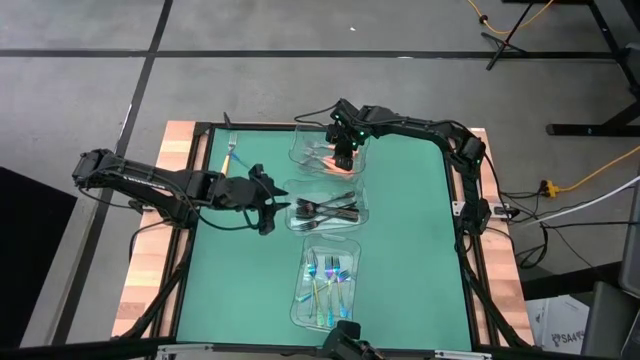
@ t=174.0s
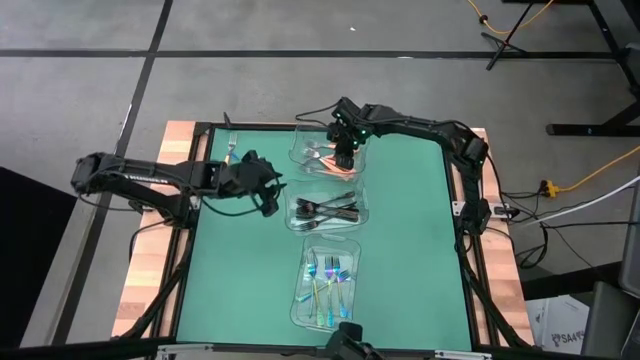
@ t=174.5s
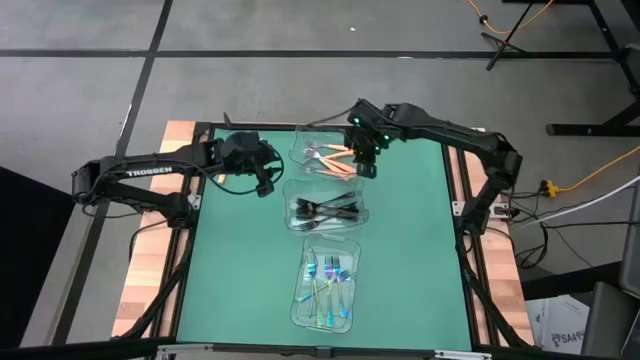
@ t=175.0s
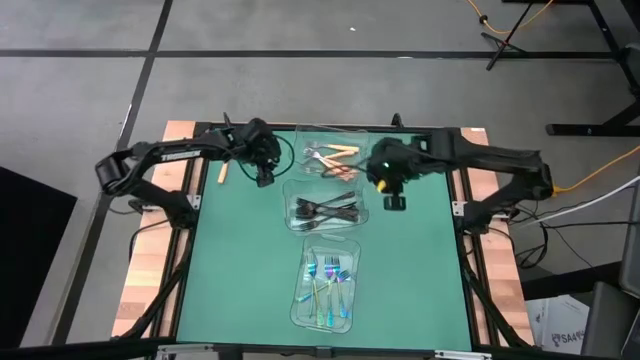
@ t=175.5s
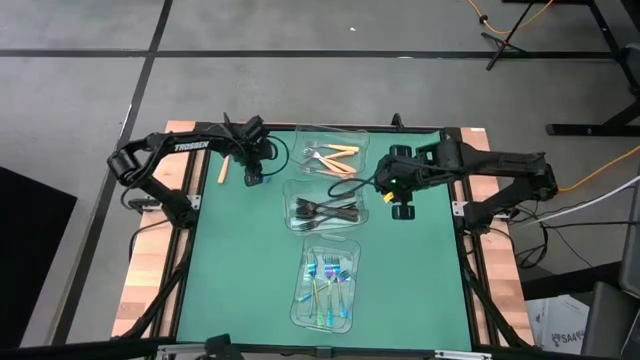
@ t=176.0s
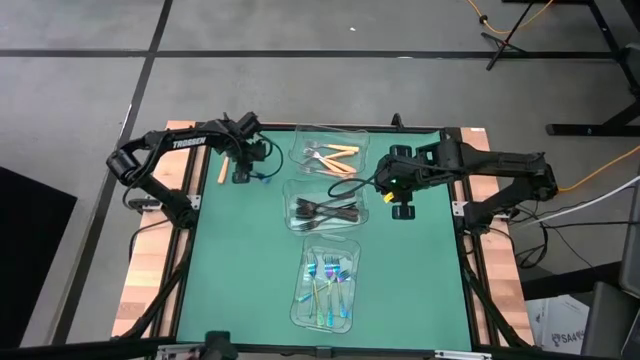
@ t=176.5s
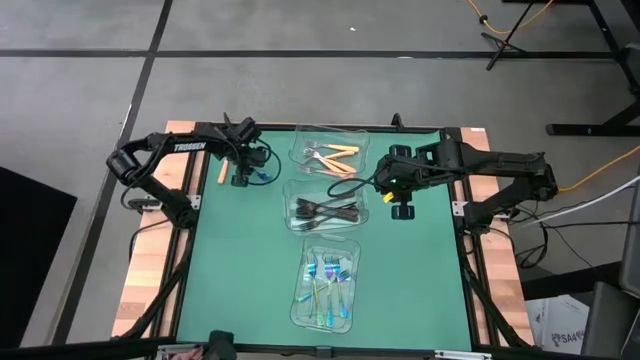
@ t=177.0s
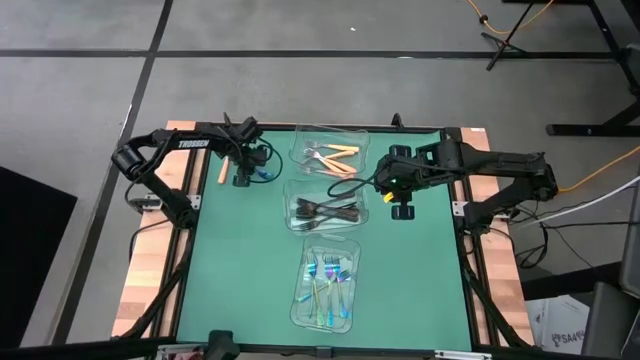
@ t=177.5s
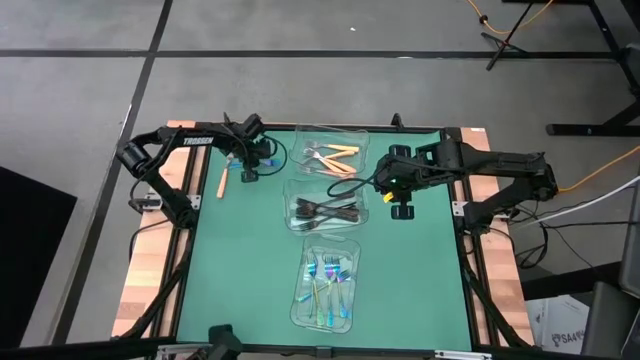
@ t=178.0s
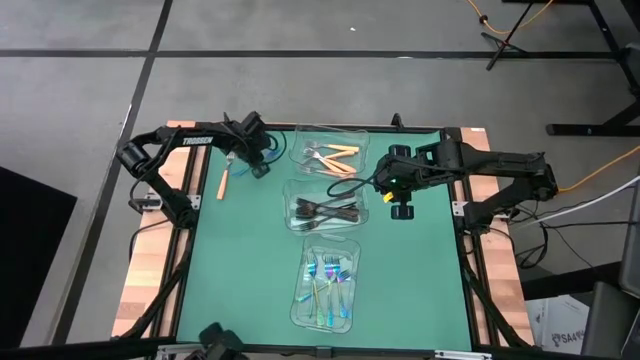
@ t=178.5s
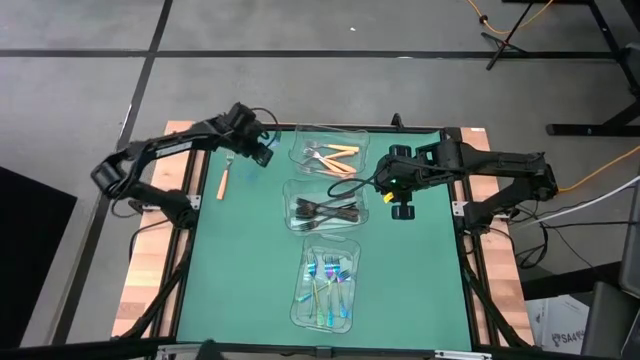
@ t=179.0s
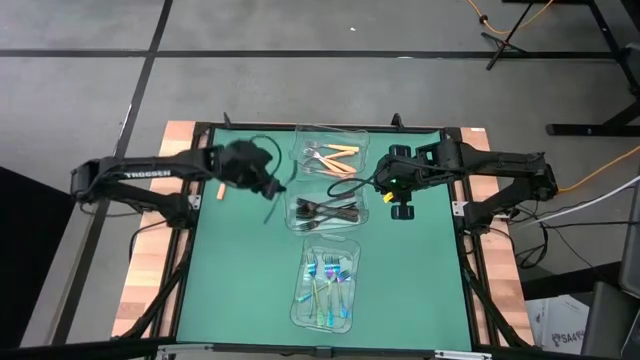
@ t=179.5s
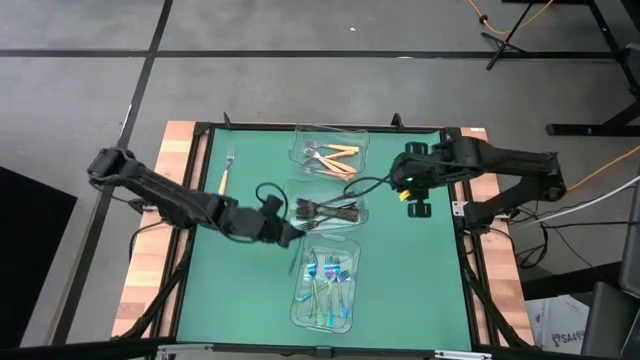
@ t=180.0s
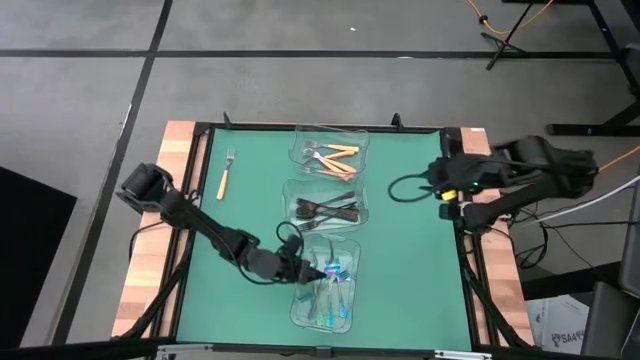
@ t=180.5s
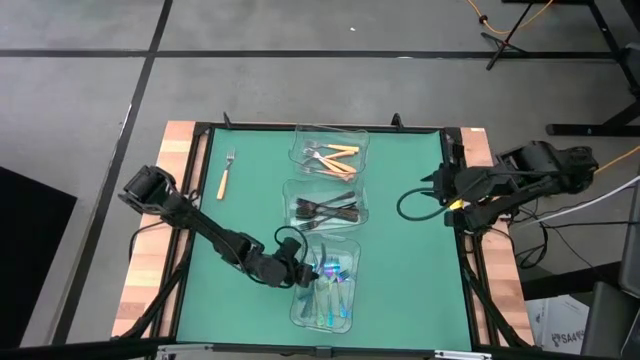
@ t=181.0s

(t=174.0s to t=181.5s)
Task: Sort silverware by color (type)
Put the blue fork into the bottom transparent bin

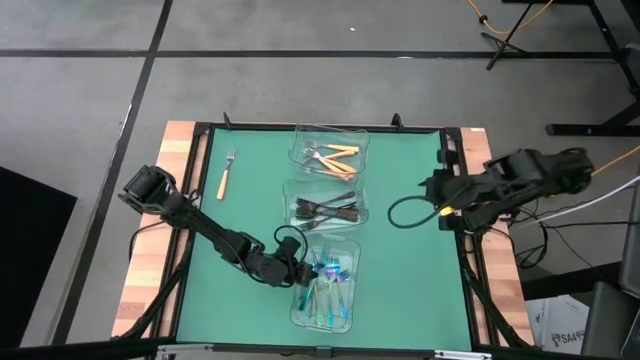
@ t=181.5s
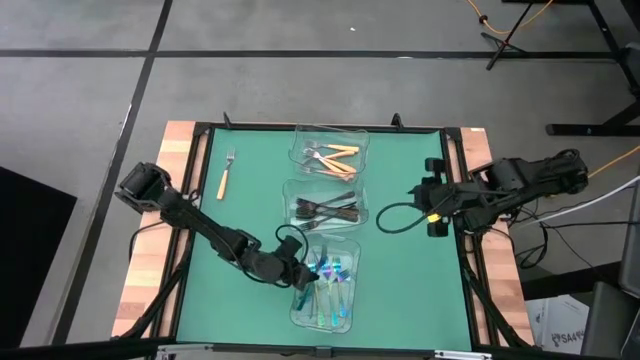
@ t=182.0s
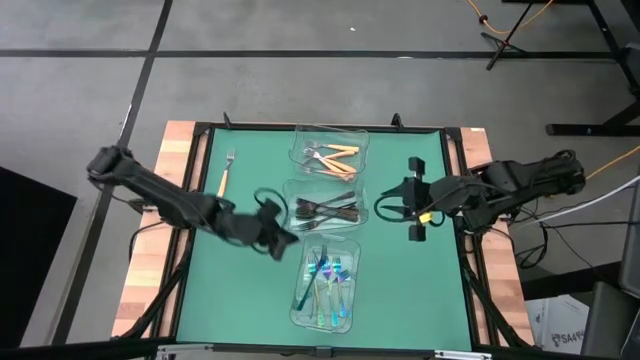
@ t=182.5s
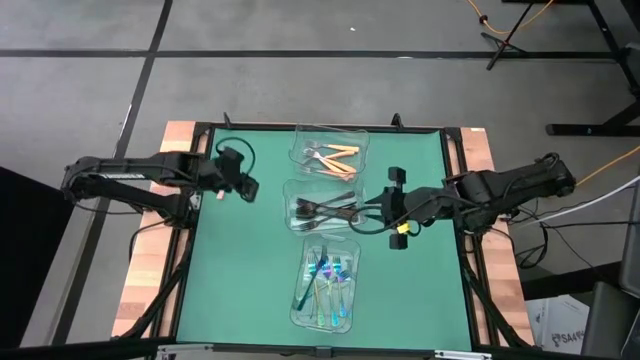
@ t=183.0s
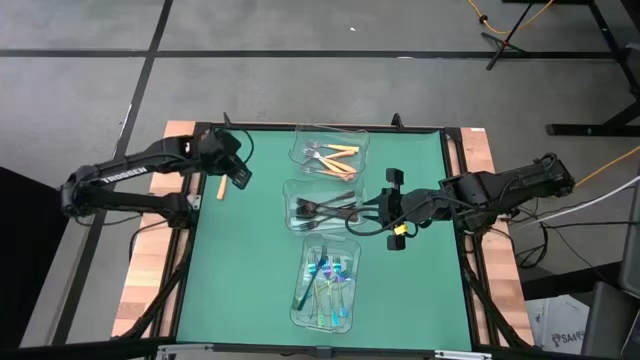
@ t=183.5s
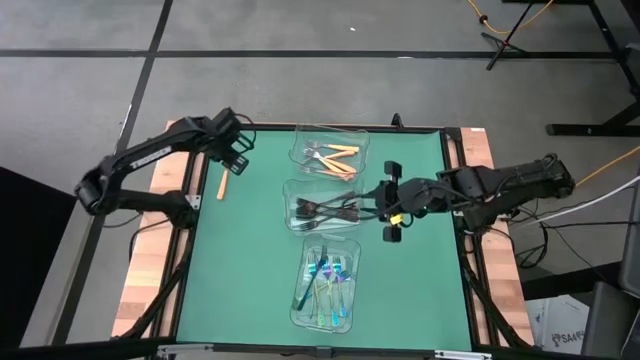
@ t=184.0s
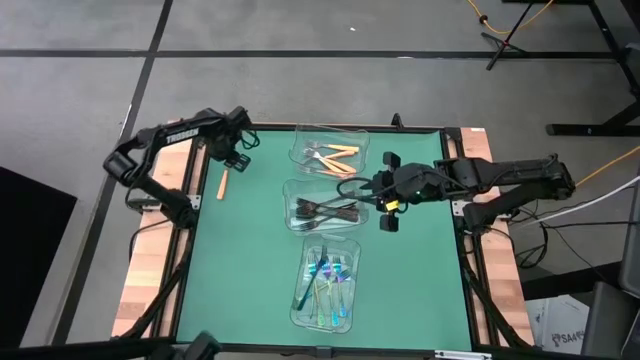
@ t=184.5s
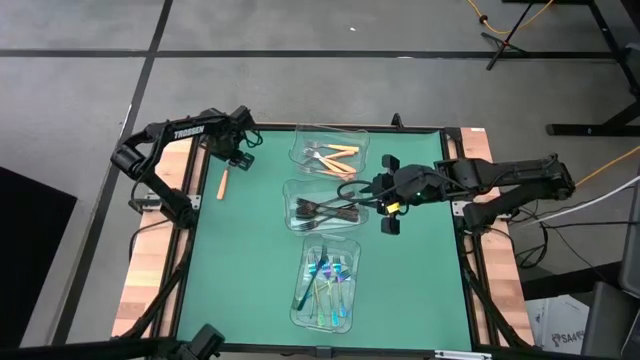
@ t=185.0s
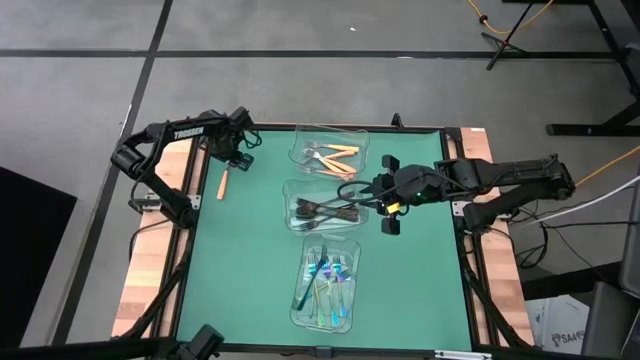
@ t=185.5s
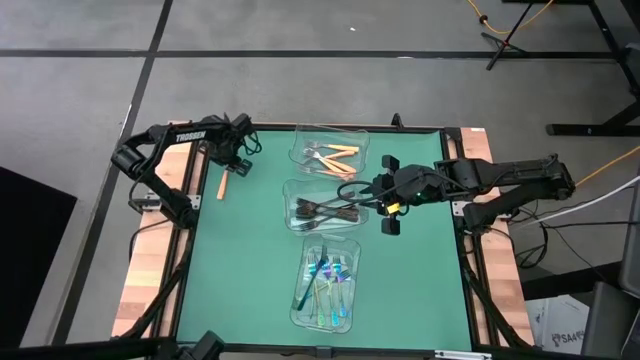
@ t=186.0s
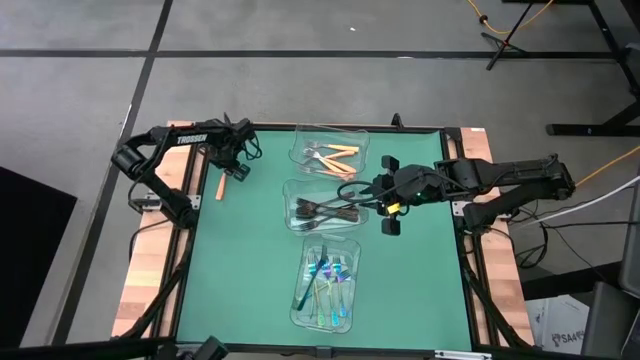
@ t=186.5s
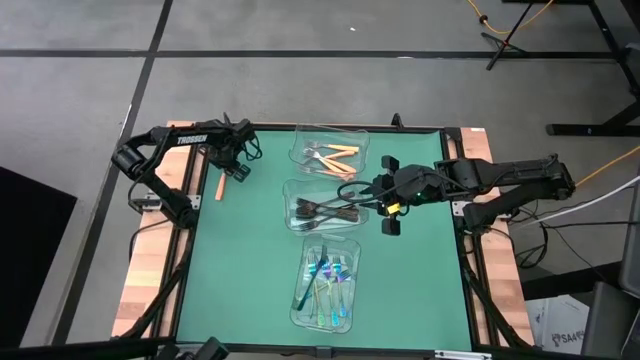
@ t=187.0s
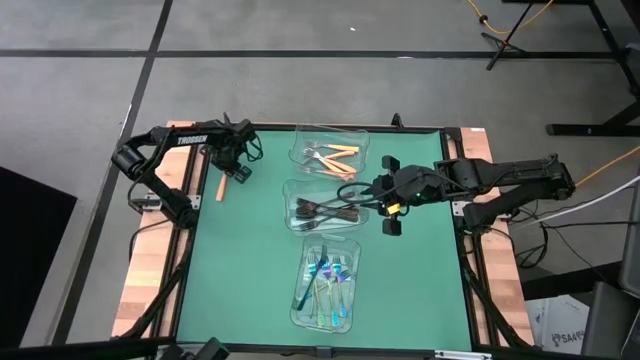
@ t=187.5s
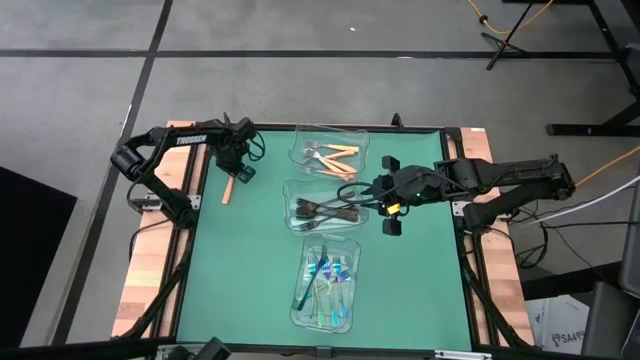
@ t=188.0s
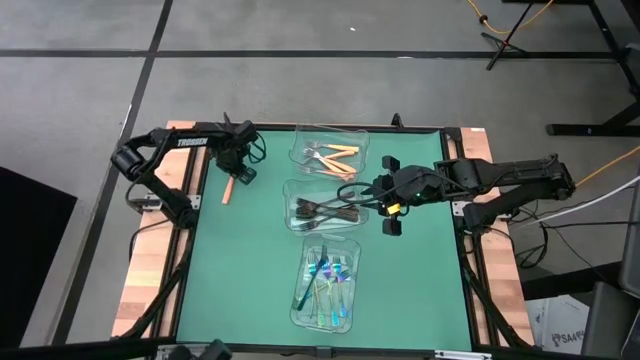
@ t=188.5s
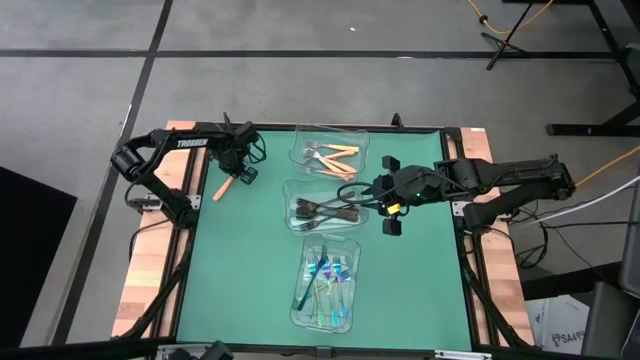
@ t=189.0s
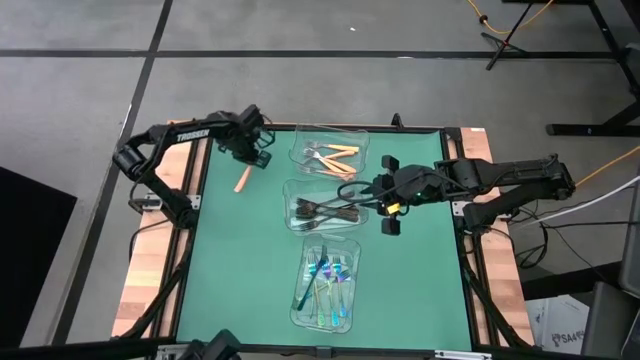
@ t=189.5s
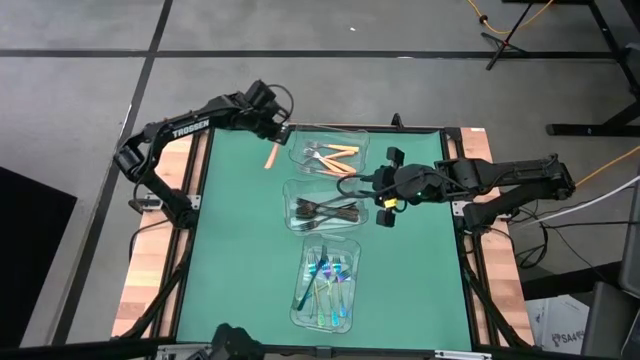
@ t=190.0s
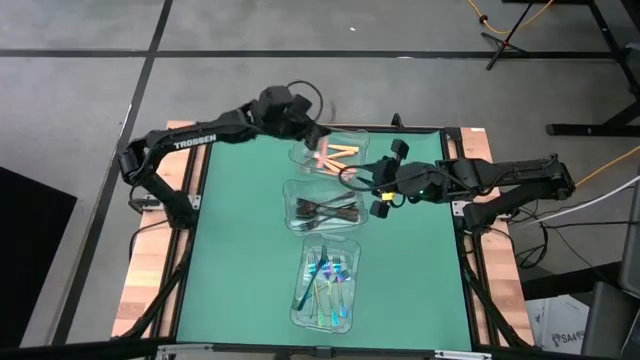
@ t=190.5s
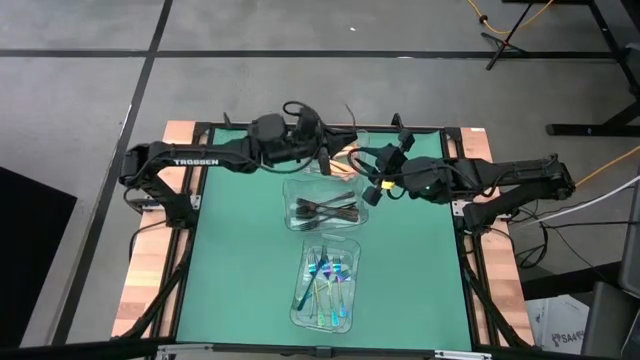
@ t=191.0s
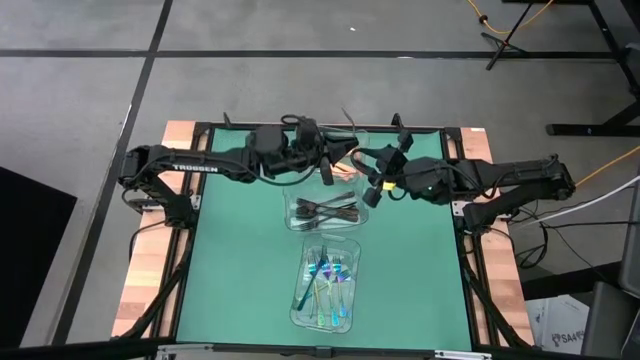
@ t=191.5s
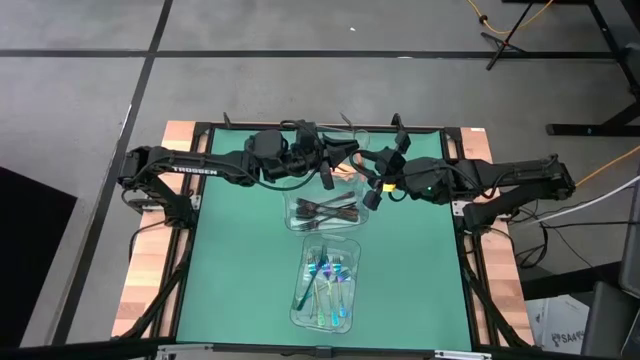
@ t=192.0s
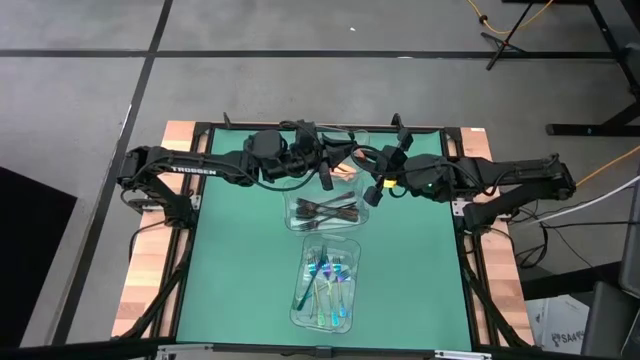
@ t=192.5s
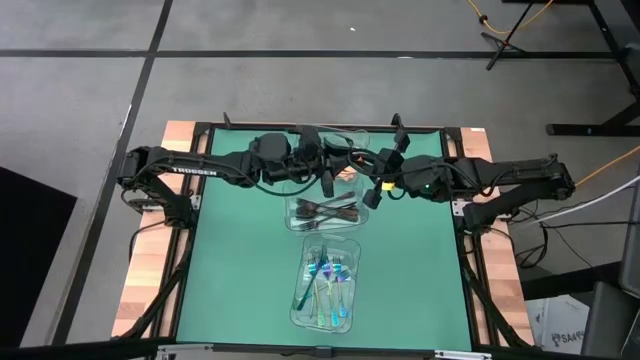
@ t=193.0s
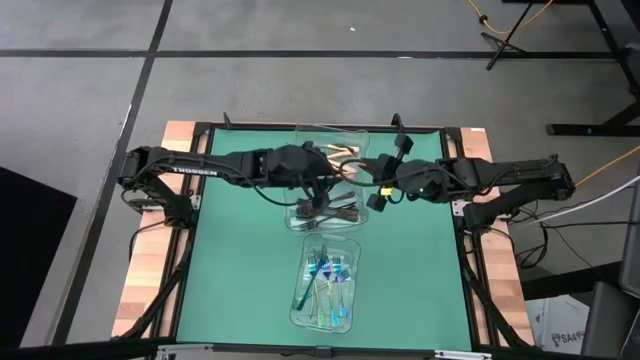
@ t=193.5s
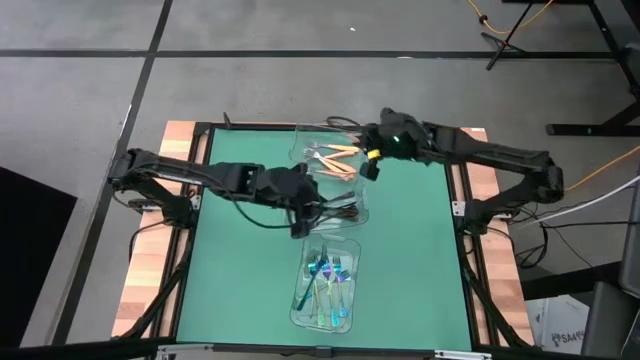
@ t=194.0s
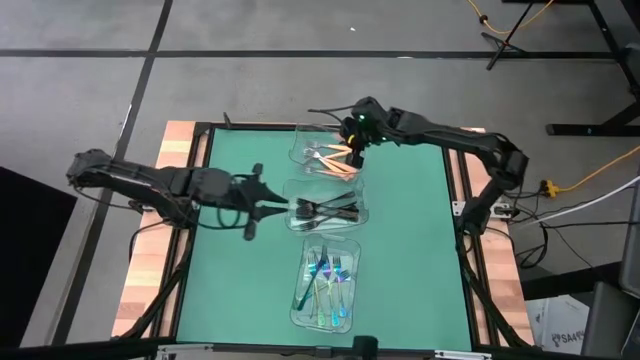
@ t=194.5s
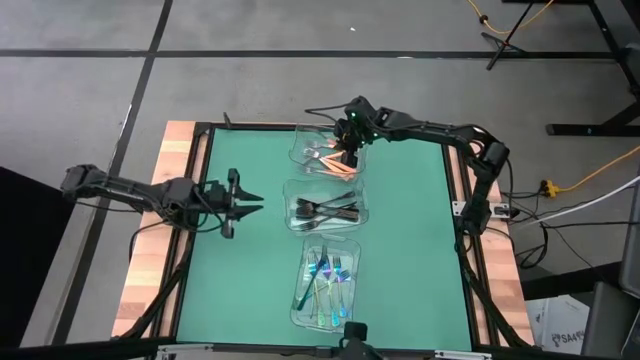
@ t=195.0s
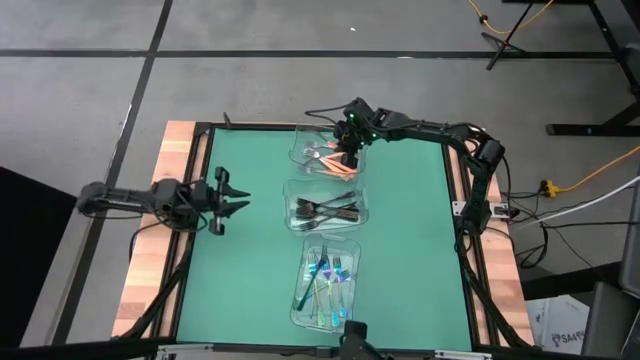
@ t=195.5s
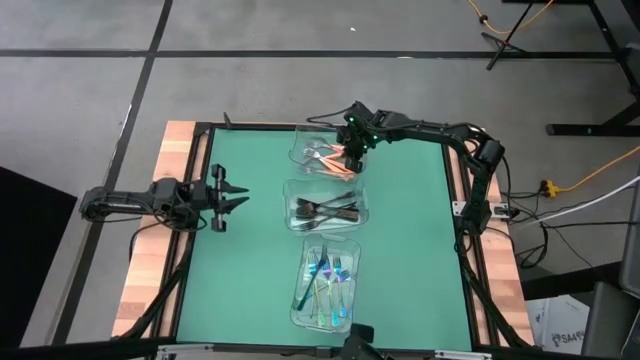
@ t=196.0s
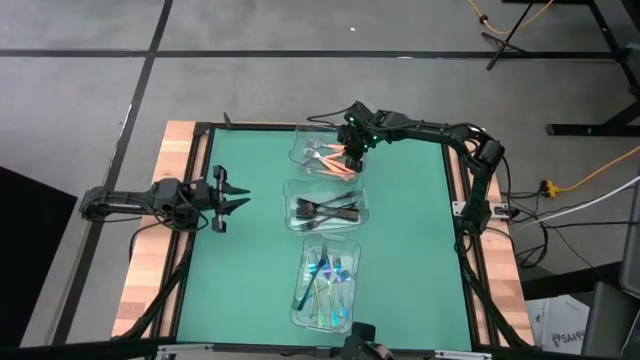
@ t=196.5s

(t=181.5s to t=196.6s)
Put the yellow fork into the top transparent bin
